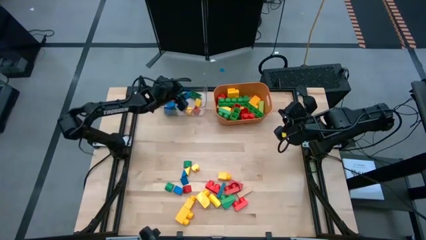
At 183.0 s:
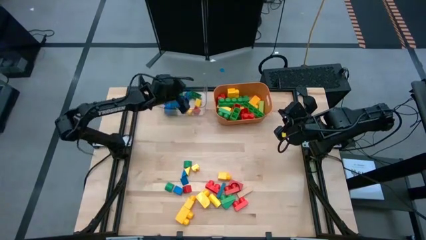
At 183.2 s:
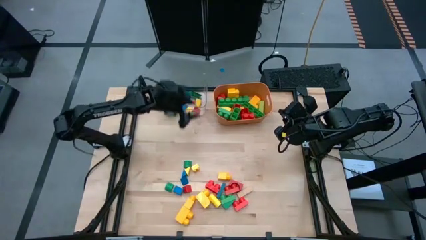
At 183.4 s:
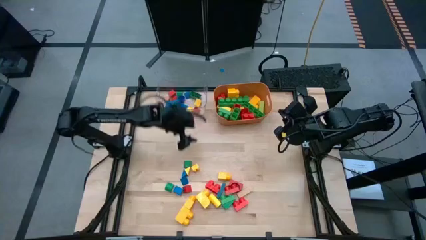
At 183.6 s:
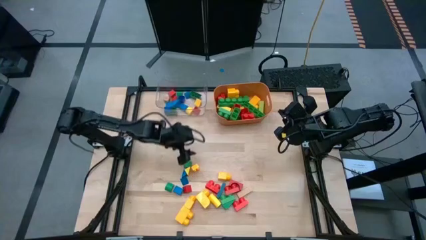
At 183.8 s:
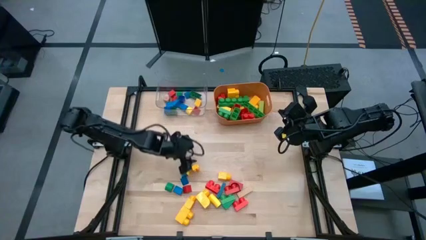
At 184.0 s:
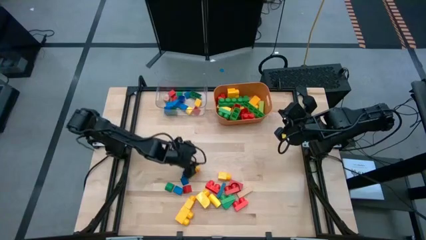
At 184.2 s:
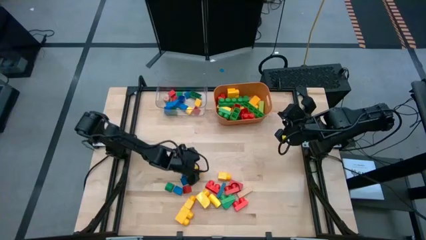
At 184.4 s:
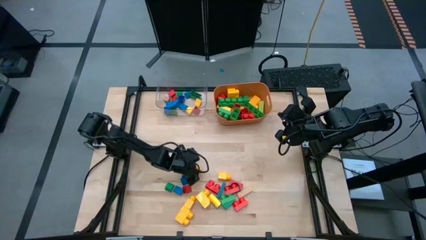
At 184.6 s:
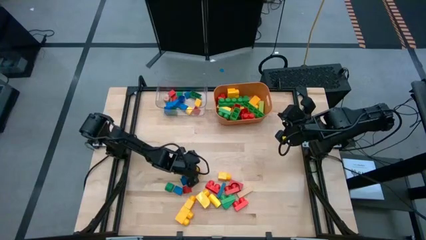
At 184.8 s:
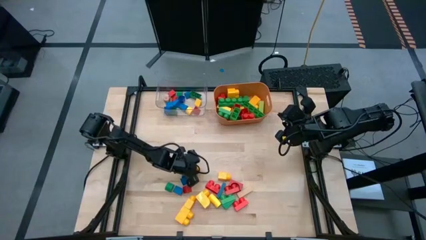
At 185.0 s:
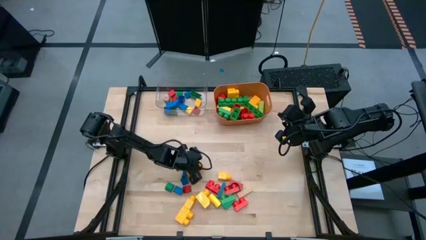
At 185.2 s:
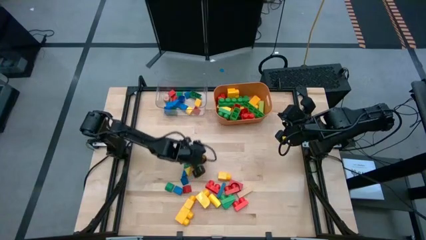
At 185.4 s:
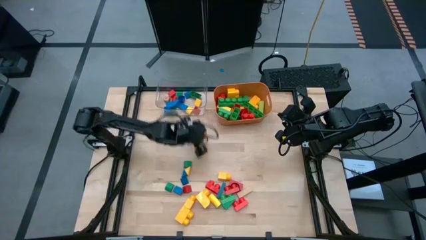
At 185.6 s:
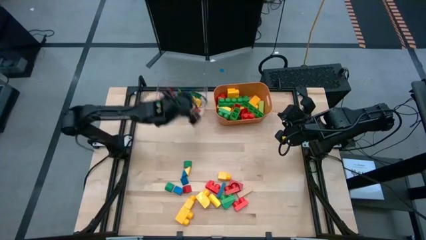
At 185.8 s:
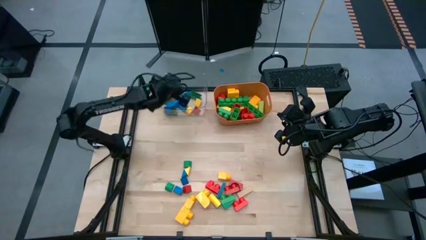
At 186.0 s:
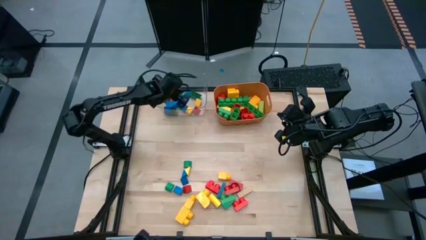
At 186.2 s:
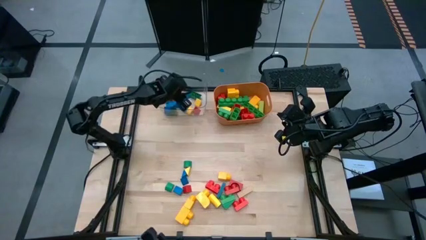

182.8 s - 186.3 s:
Task: Sort blocks by size
Put the small yellow game piece into the transparent bin

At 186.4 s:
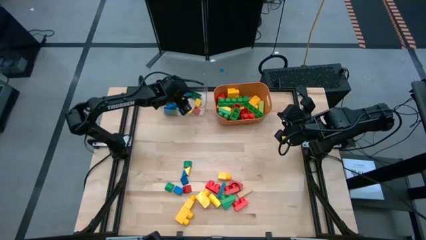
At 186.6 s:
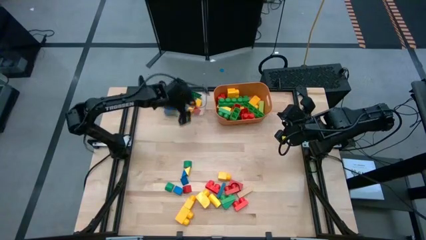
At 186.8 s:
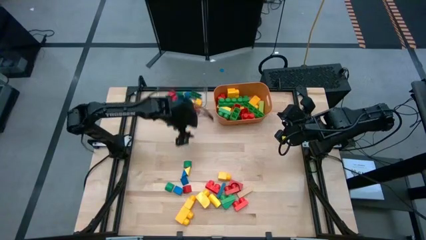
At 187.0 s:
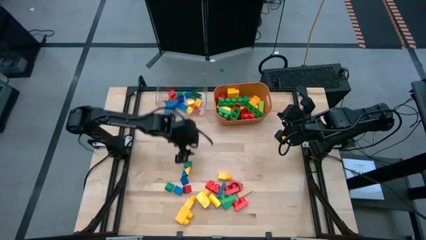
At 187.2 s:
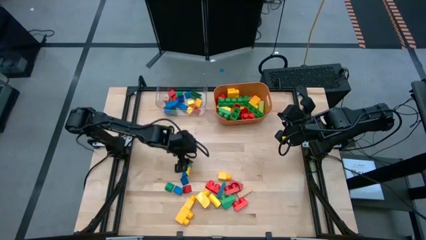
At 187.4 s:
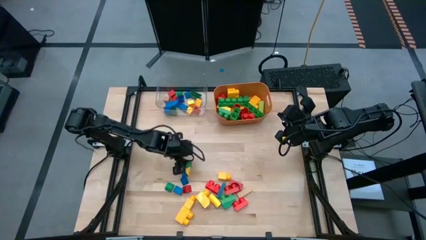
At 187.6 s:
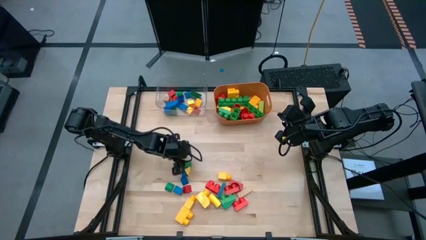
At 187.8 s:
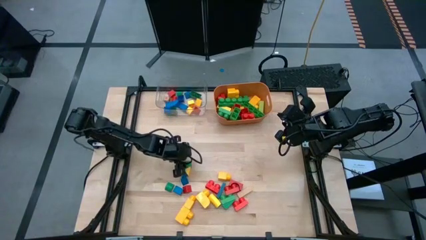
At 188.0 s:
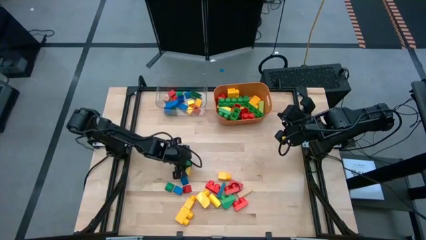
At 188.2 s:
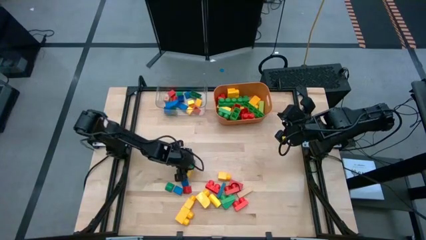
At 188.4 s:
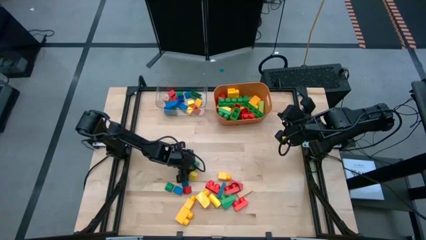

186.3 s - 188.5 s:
Put the small green block into the transparent bin

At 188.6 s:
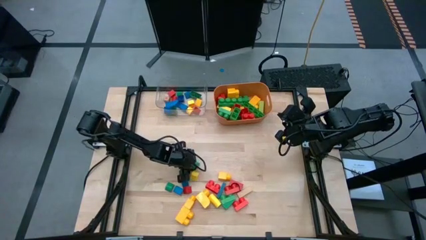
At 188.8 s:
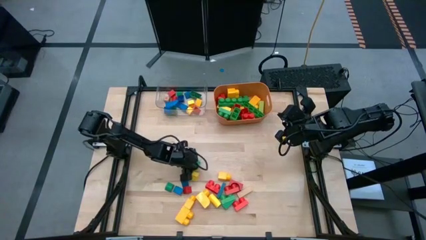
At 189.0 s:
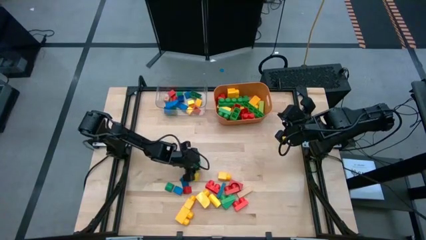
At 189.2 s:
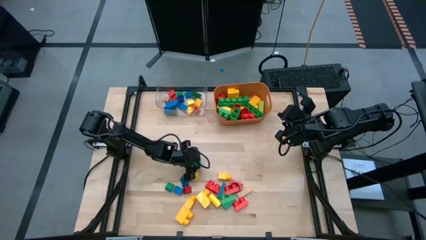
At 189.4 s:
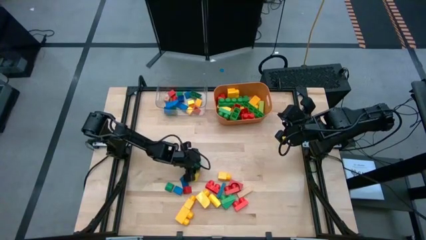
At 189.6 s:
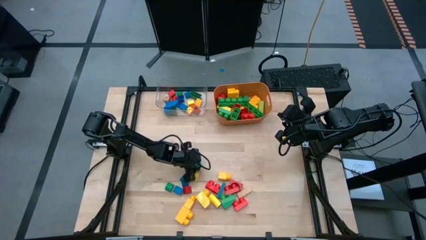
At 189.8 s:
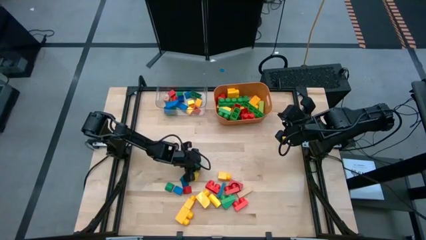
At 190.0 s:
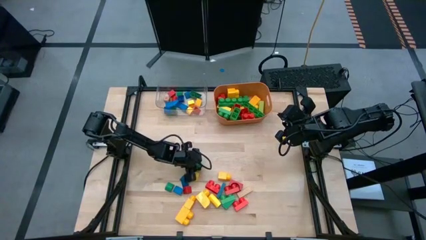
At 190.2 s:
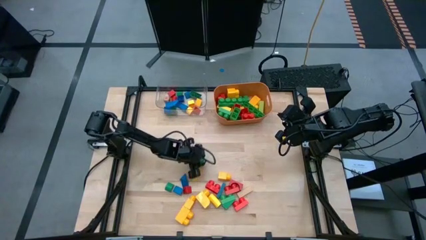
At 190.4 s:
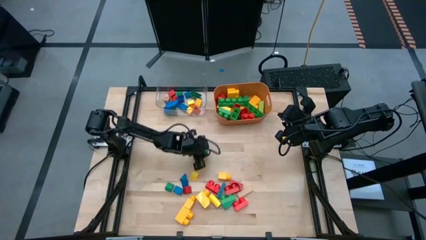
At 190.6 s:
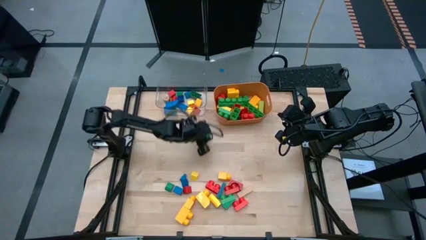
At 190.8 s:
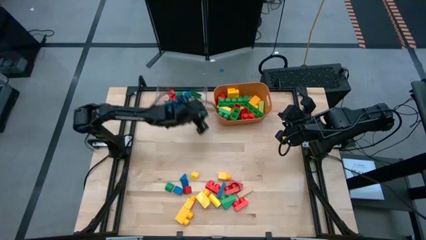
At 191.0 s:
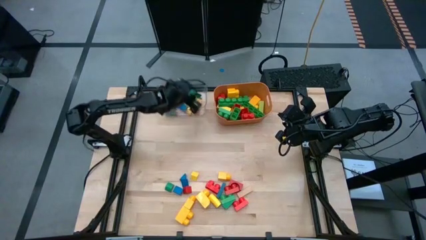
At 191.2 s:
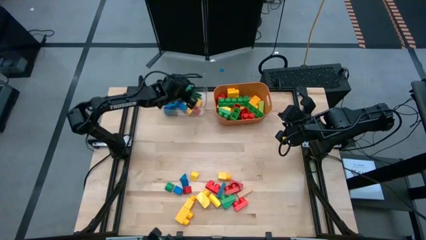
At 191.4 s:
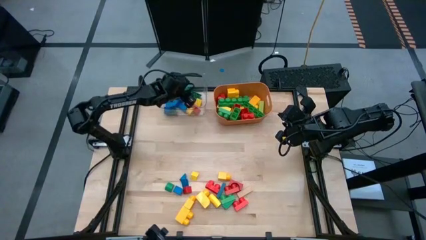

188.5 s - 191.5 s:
Put the small green block into the transparent bin

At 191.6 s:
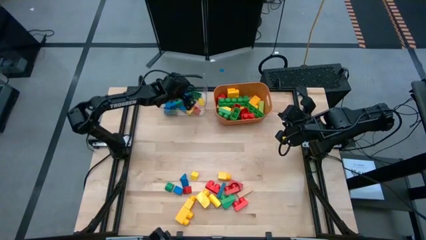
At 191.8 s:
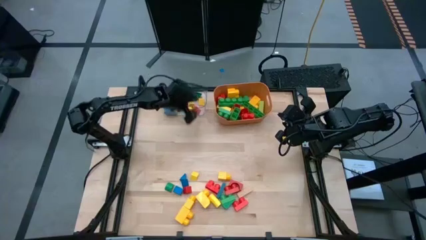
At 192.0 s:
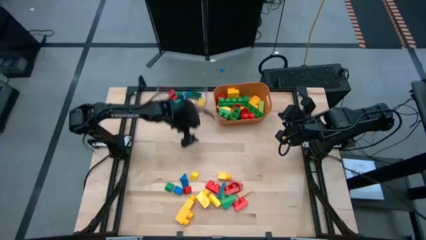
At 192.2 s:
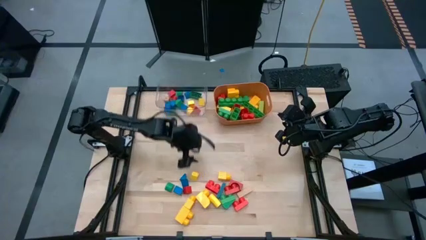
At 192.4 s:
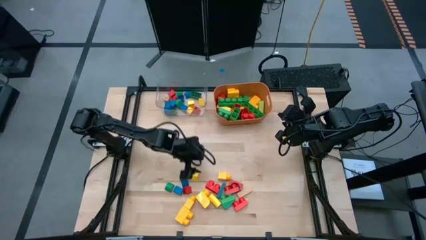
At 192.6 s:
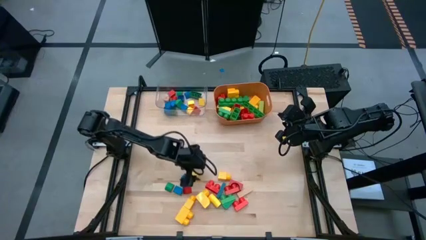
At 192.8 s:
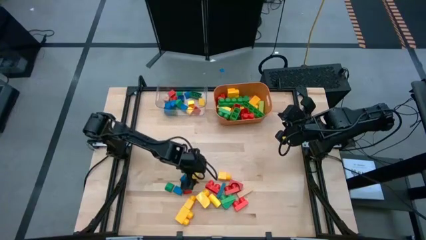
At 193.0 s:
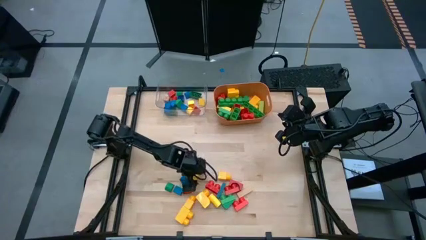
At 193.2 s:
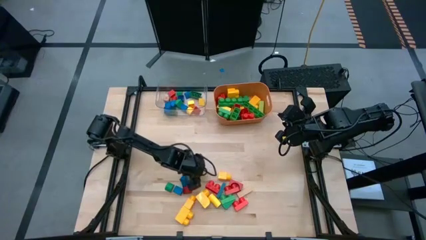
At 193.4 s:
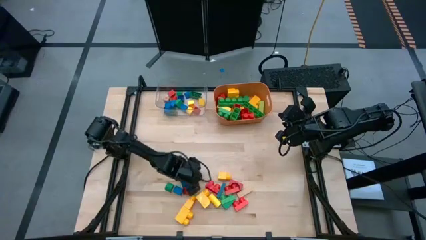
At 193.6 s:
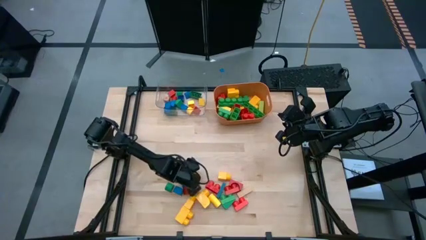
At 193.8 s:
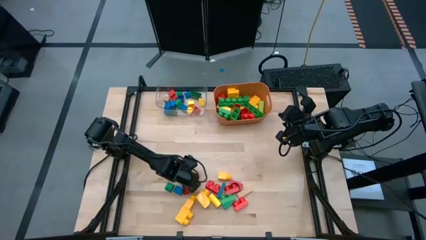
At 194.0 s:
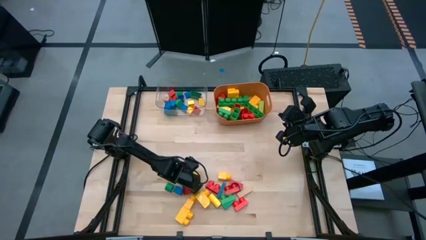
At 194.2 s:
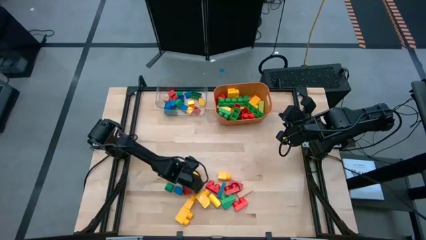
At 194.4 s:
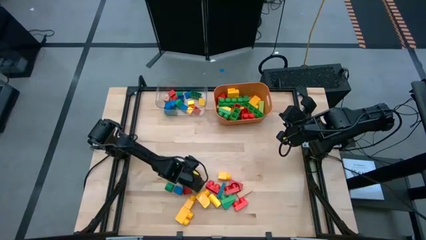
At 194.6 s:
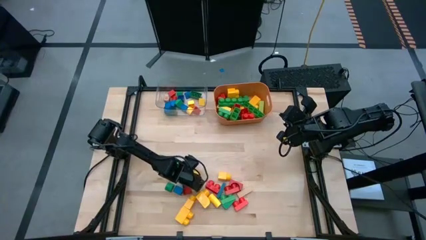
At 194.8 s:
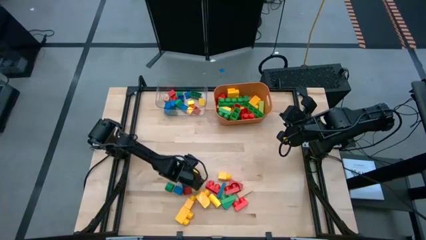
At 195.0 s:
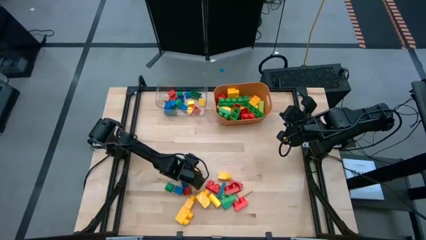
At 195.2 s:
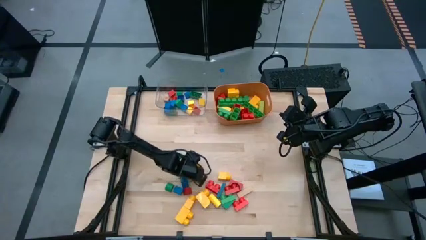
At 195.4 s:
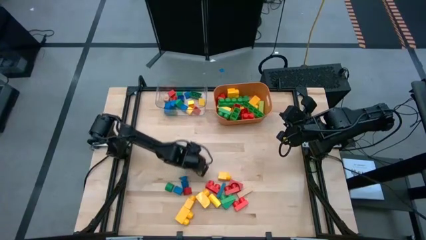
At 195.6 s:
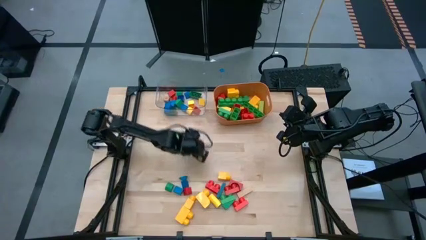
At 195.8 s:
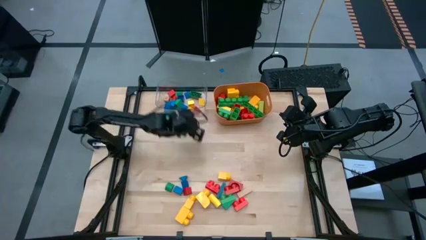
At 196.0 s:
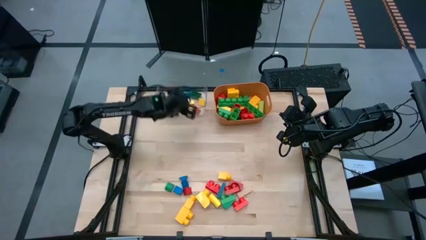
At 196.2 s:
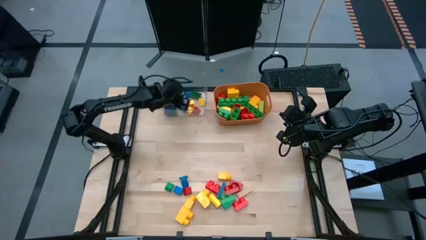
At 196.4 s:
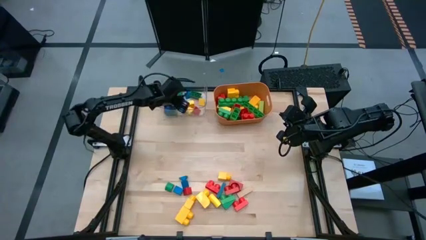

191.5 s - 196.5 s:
Put the small yellow block into the transparent bin

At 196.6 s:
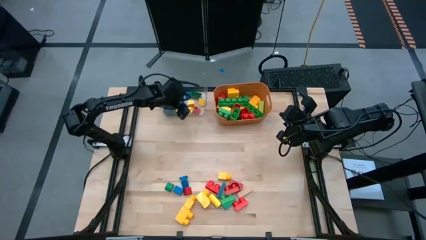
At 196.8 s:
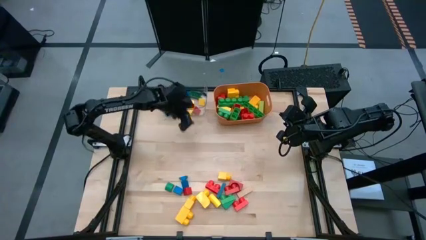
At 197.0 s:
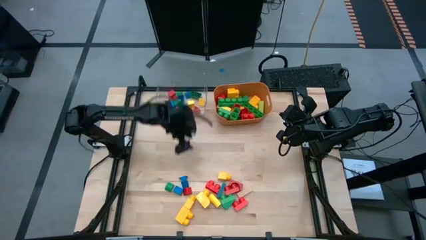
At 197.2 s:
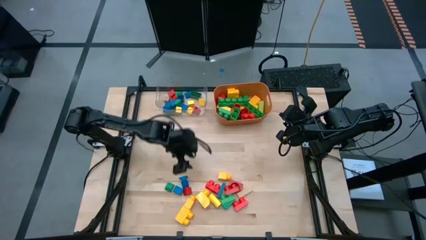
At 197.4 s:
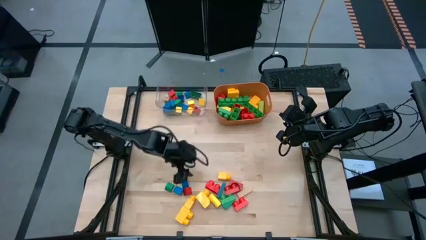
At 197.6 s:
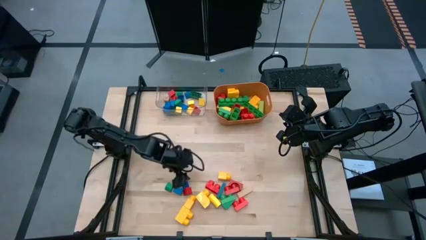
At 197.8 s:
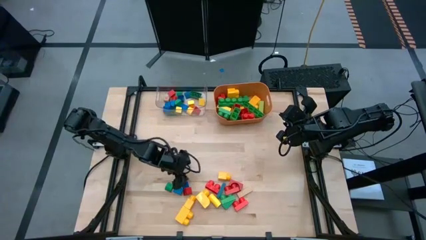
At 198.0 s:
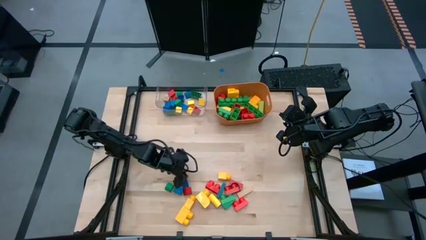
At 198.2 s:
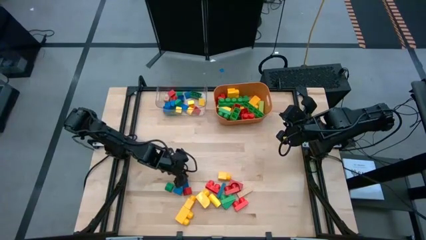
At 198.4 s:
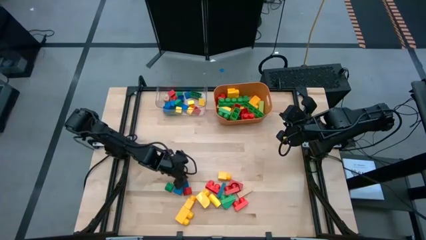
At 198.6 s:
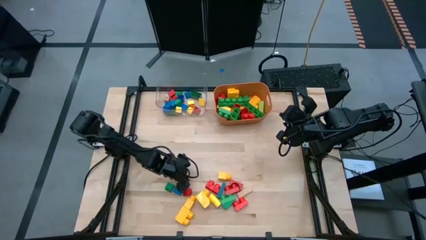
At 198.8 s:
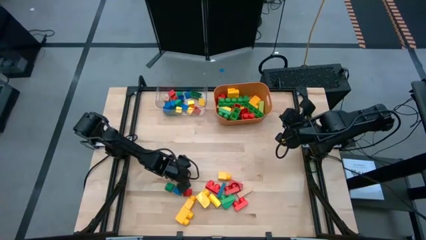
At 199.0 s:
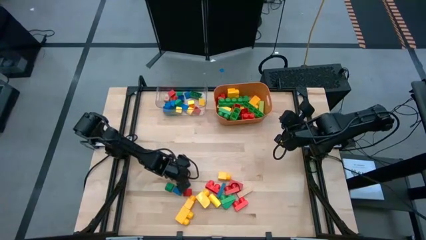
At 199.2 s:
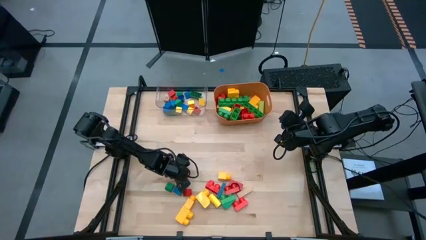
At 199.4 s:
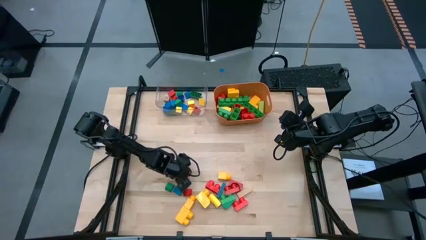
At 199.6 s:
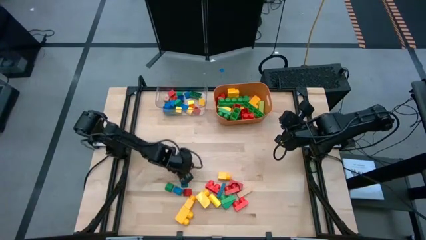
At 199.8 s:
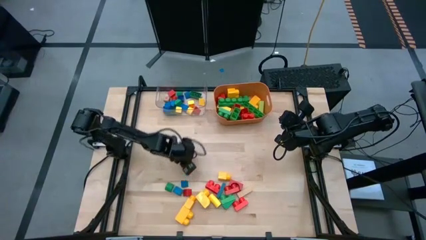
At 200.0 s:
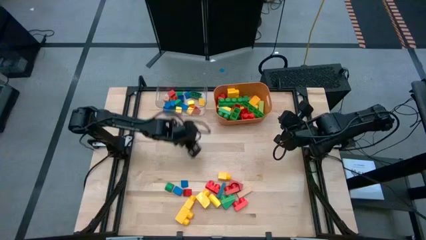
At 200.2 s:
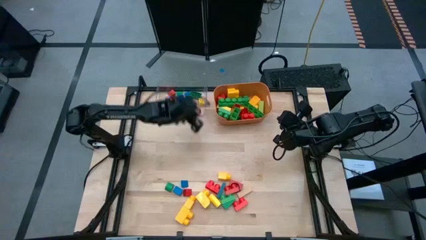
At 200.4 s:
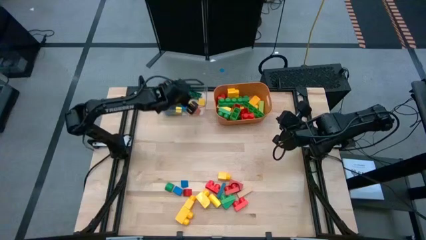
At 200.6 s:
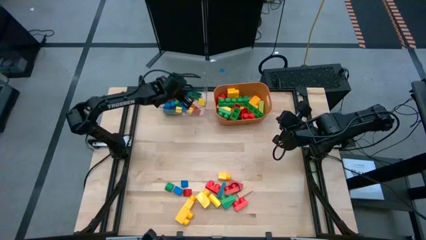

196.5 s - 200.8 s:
Put the small blue block into the transparent bin
